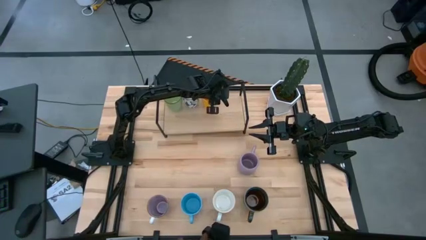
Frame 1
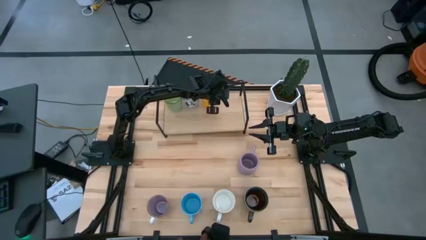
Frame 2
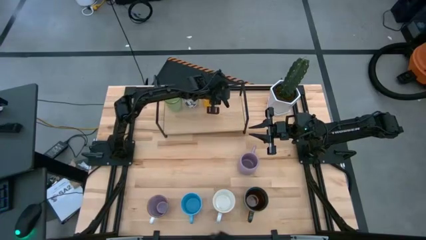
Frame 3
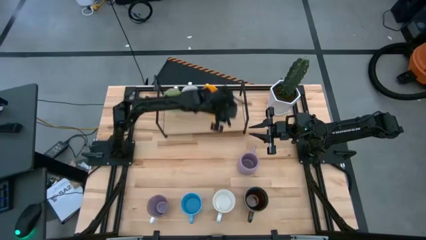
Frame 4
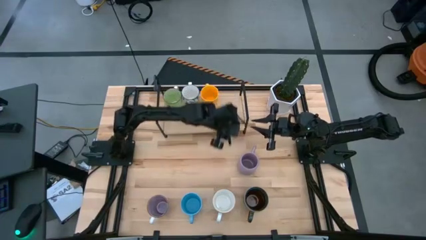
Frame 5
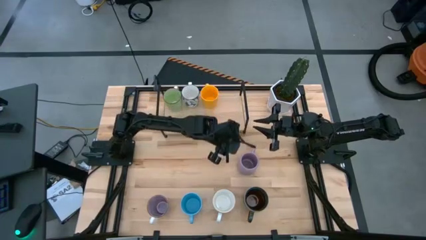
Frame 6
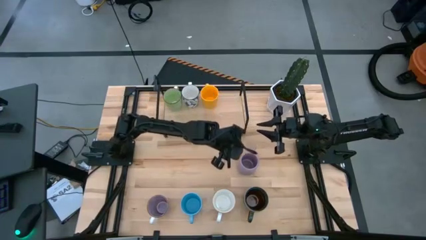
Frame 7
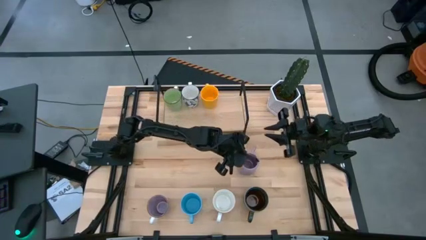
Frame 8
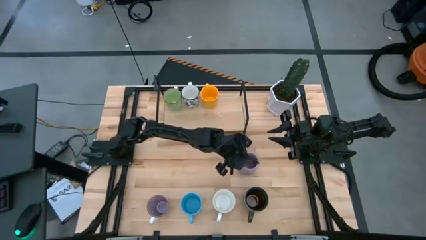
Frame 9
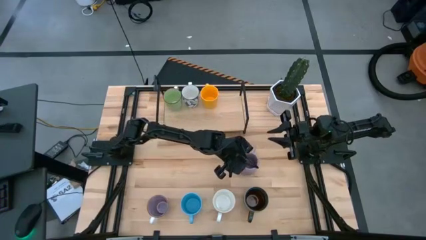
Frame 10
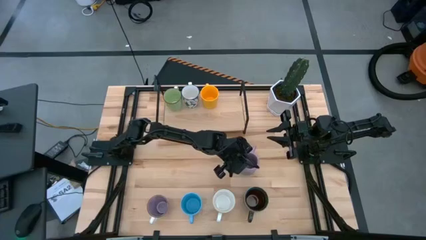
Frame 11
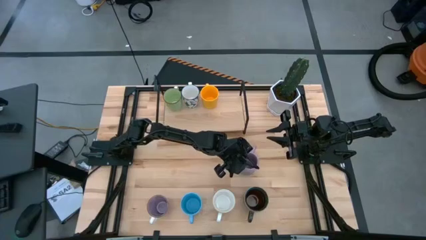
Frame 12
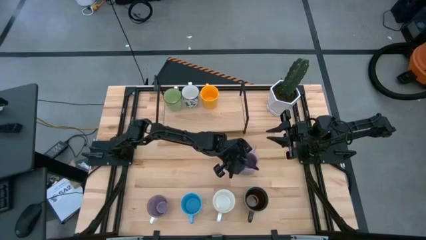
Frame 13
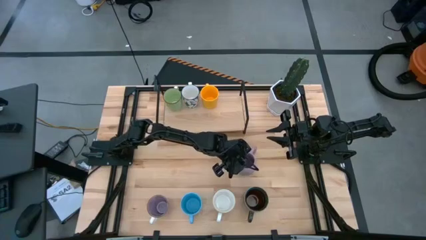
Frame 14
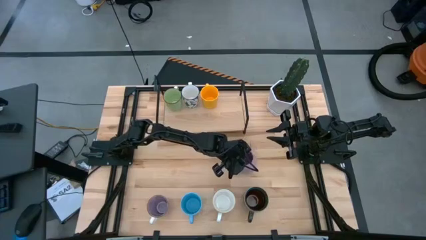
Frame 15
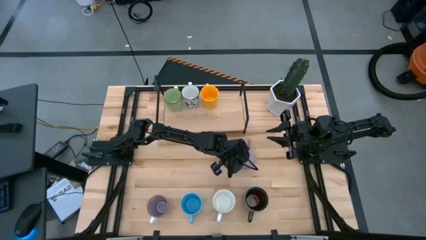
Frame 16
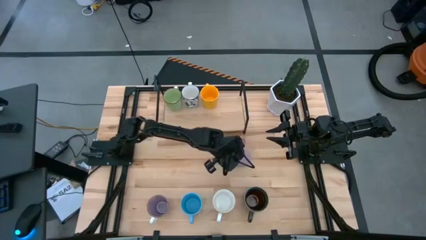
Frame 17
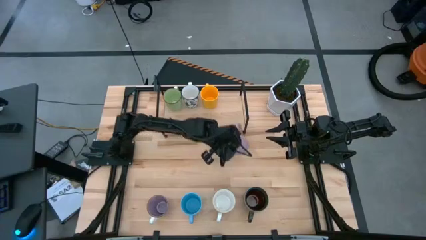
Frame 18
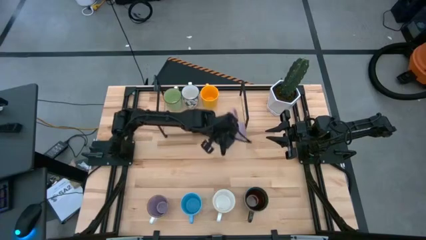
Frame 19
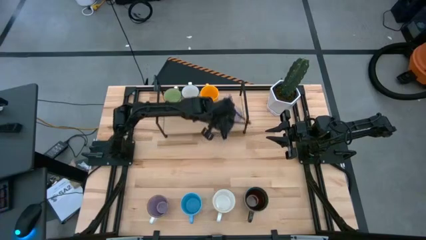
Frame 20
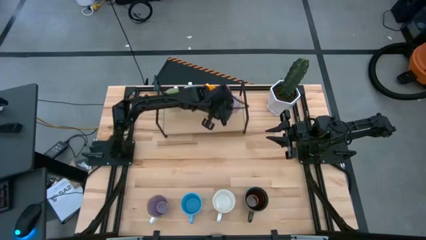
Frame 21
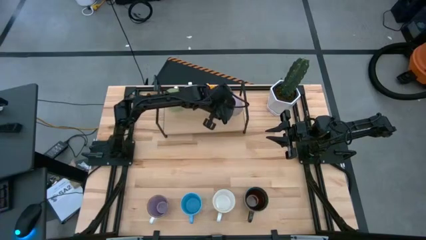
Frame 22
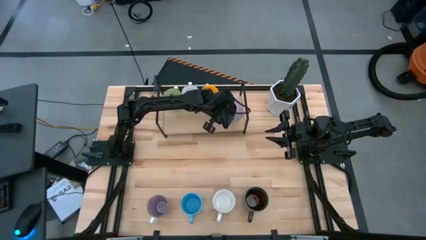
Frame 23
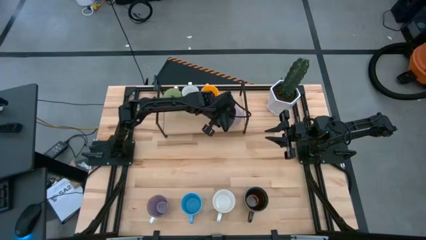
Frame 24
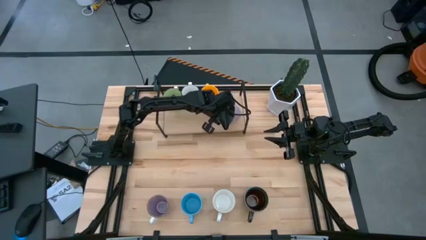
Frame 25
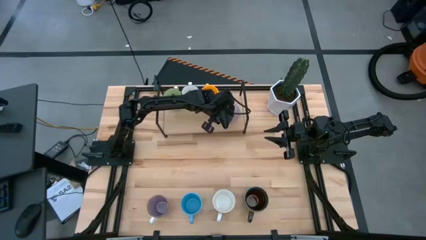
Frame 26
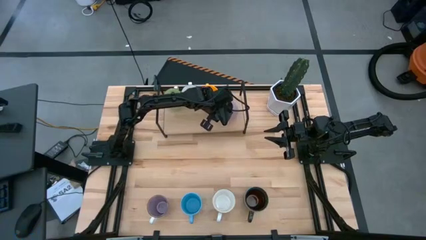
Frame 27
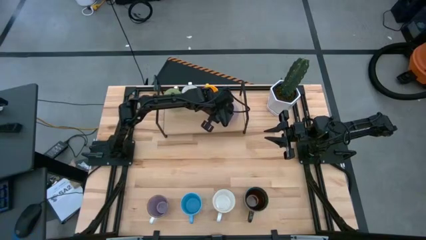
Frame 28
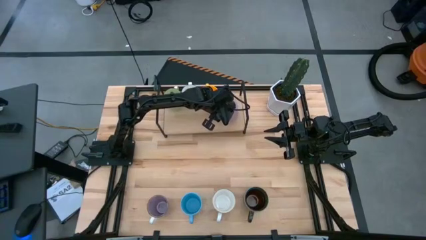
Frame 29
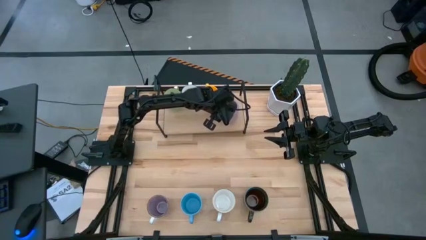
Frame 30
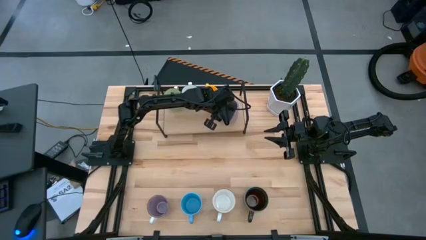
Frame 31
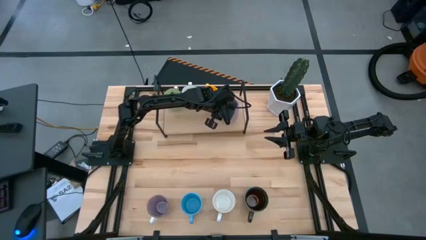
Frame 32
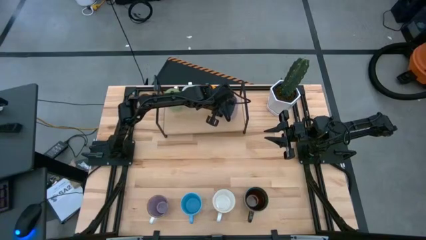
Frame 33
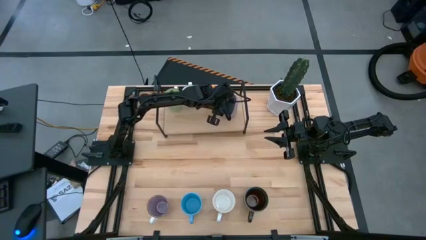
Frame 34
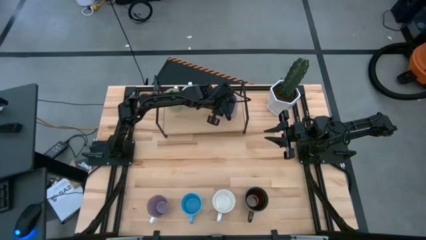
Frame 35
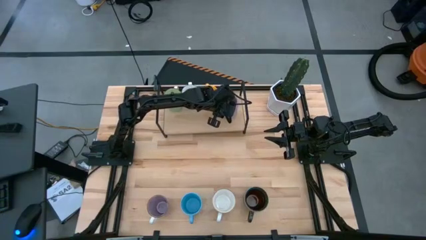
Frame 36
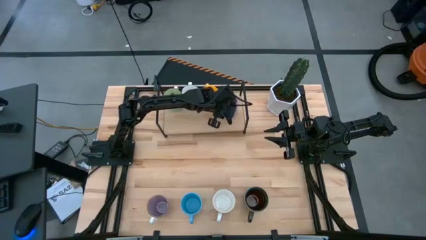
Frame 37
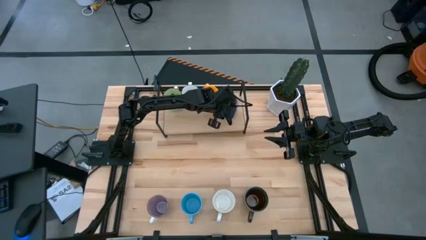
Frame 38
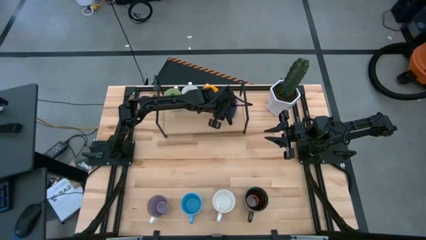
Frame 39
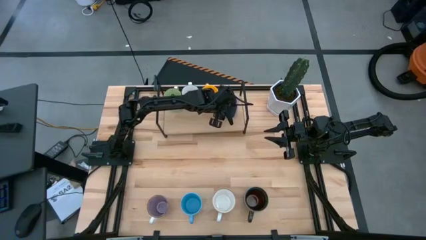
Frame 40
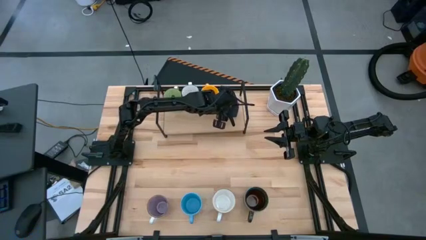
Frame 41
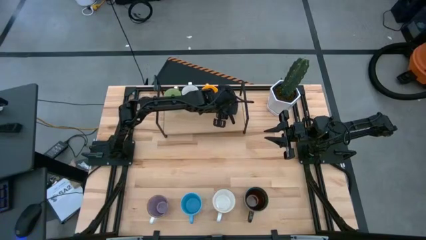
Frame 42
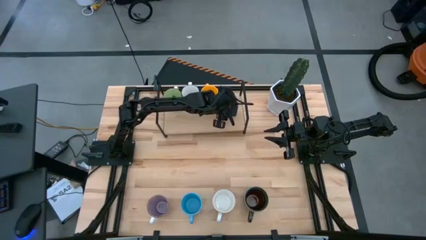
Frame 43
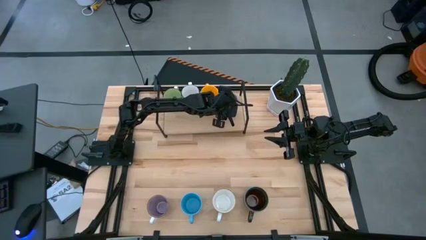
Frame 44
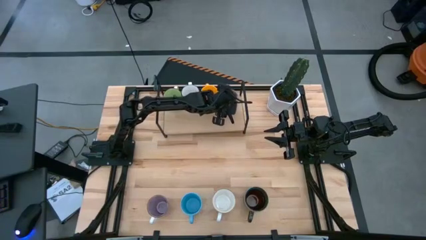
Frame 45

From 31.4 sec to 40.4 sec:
Task: Place coffee mugs
Put the purple mug on the shelf

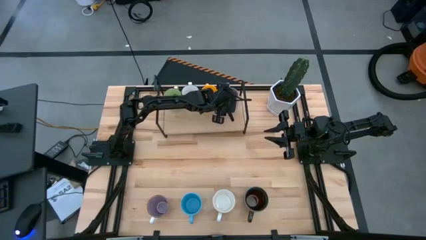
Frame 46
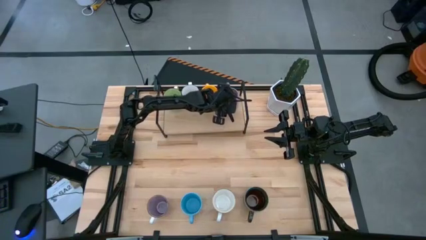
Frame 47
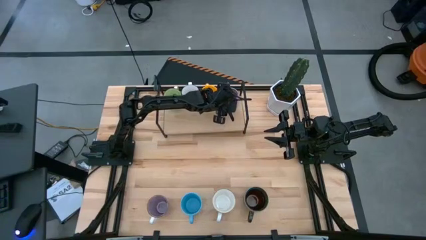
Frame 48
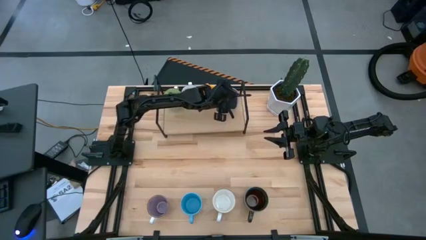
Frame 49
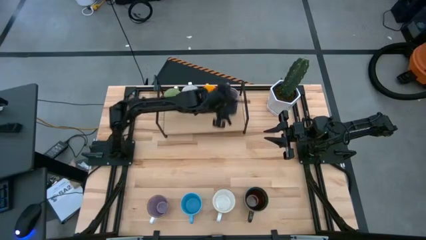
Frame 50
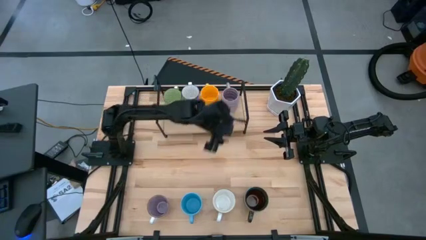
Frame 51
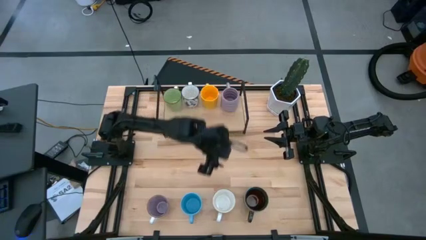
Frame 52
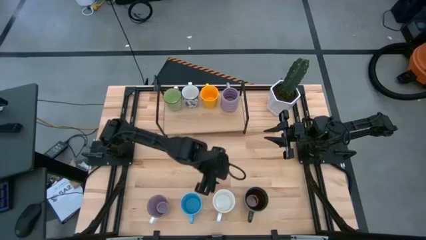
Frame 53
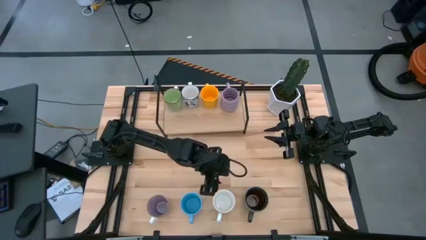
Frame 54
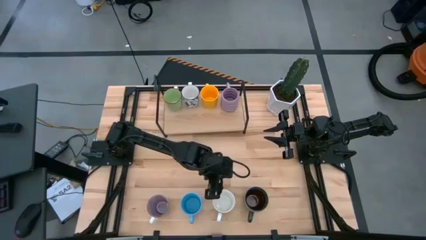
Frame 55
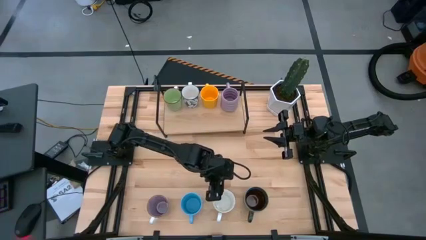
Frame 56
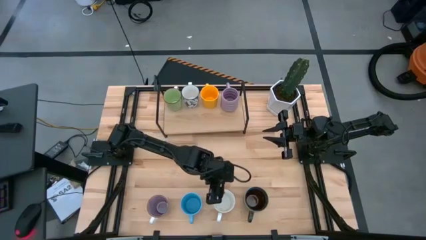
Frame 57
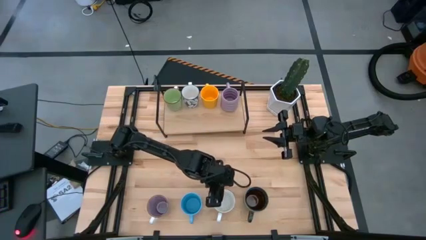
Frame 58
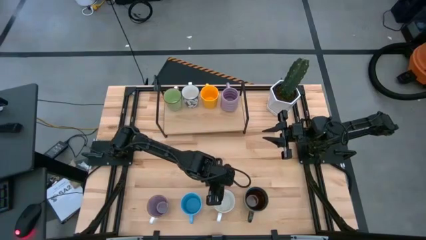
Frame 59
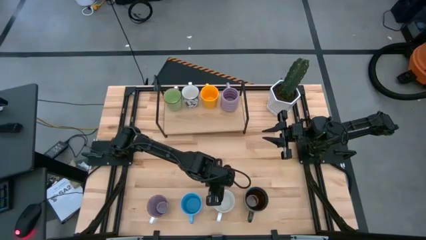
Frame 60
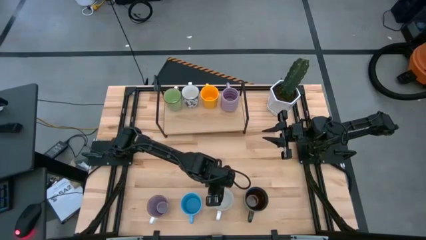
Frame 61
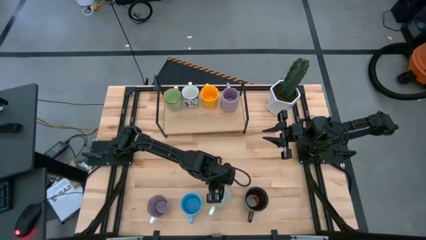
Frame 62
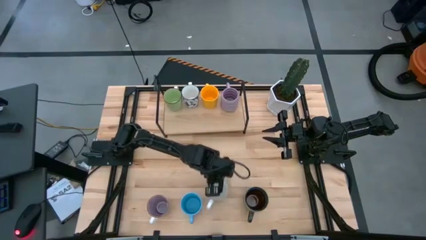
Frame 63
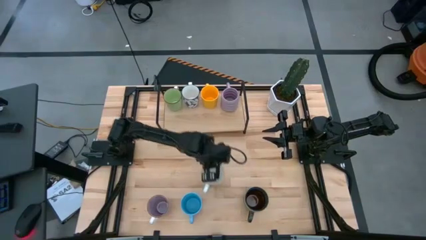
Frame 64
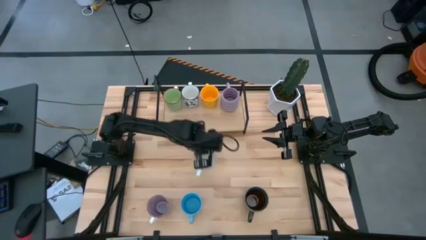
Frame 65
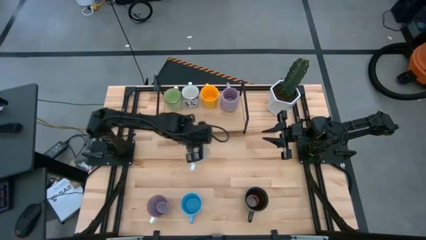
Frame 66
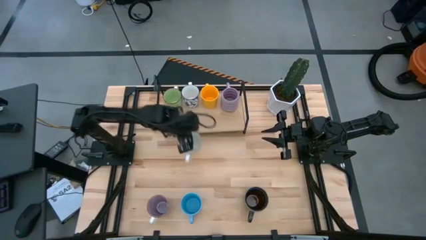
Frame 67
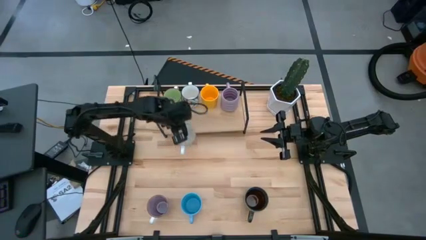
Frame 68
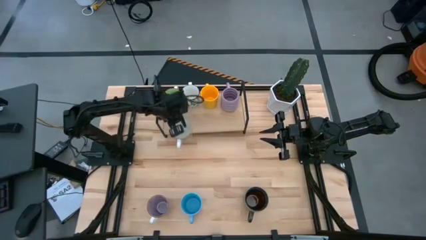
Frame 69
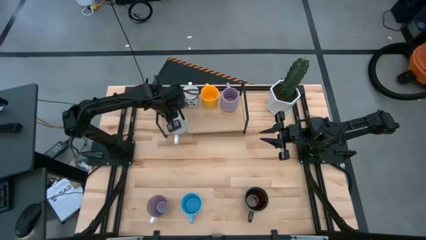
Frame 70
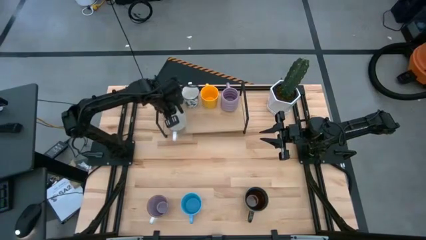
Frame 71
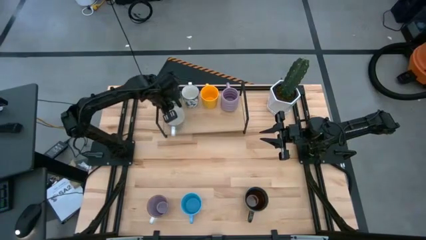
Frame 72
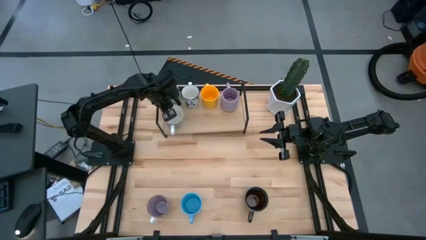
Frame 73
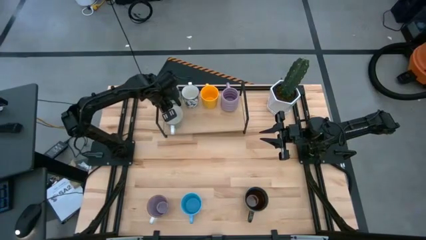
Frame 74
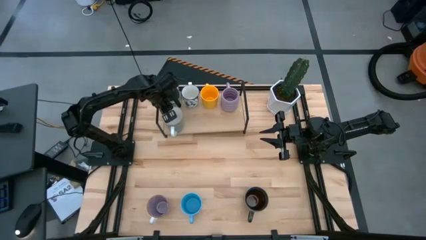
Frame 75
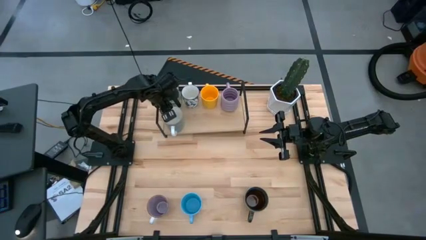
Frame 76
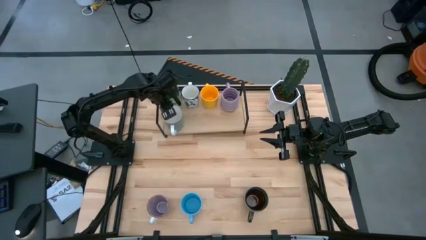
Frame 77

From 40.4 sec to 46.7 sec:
Put the green mug on the shelf
